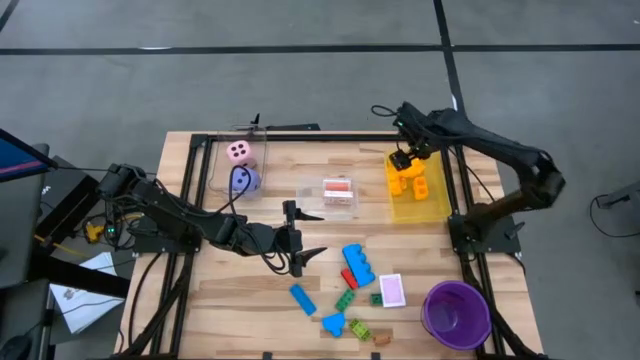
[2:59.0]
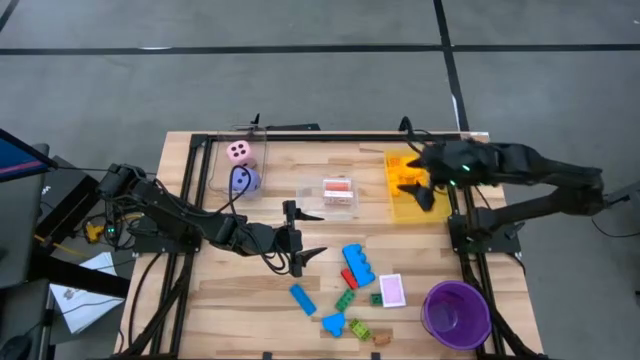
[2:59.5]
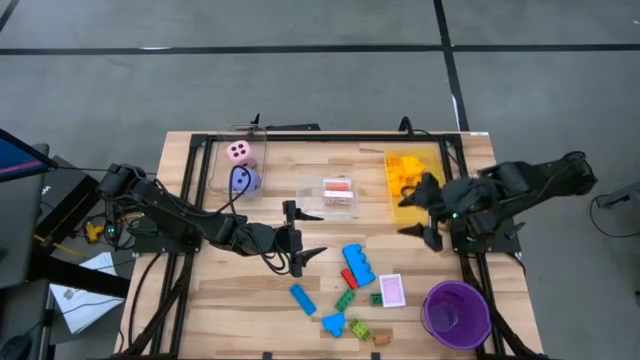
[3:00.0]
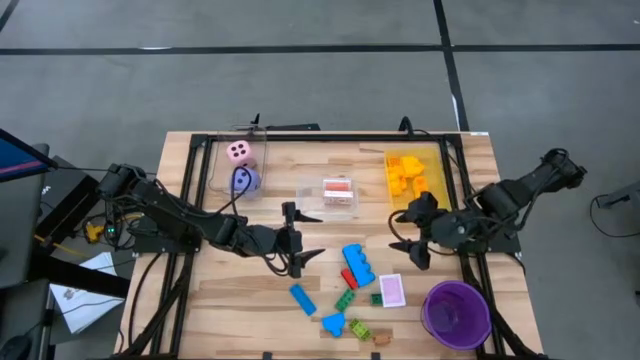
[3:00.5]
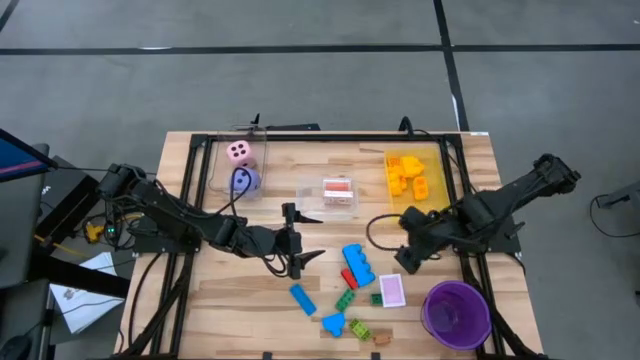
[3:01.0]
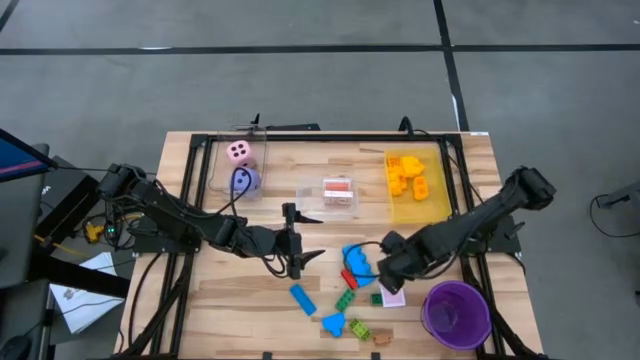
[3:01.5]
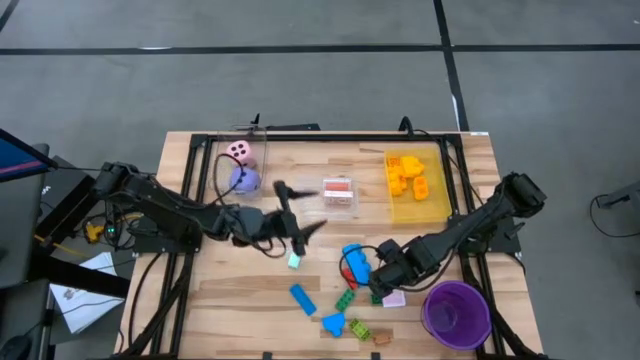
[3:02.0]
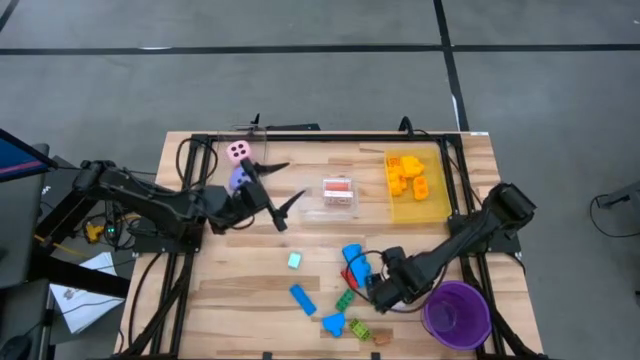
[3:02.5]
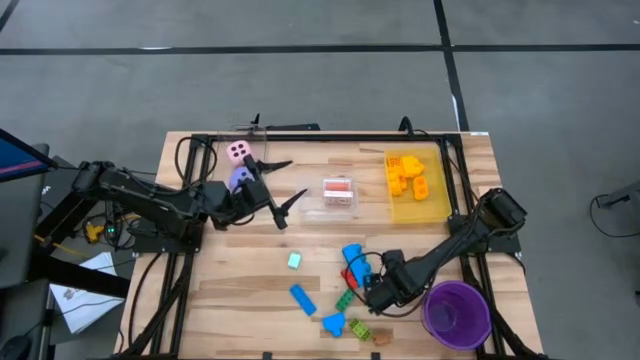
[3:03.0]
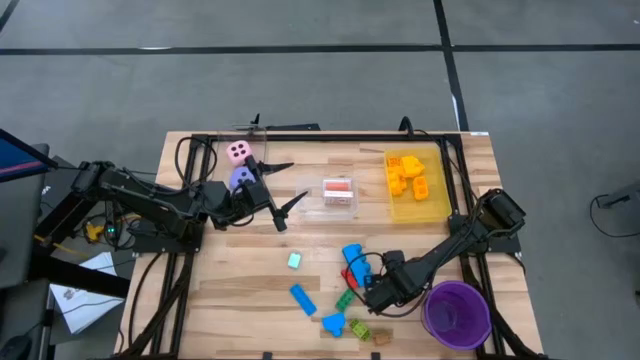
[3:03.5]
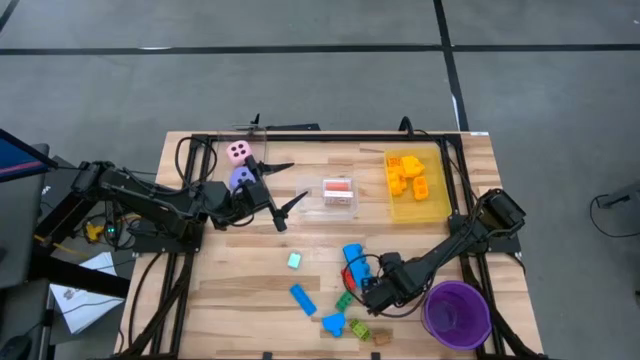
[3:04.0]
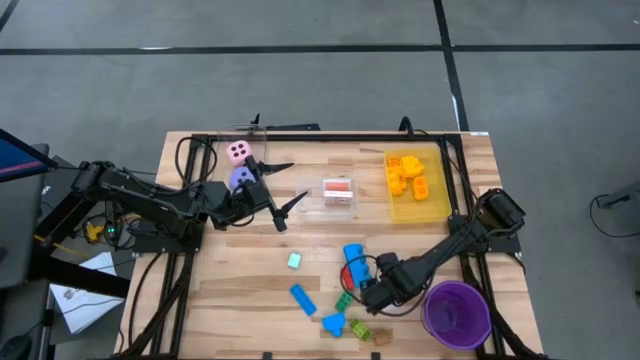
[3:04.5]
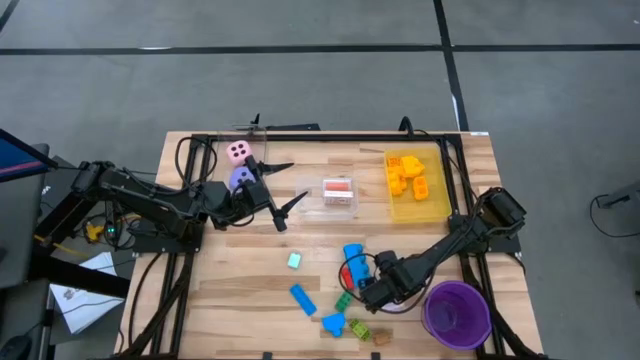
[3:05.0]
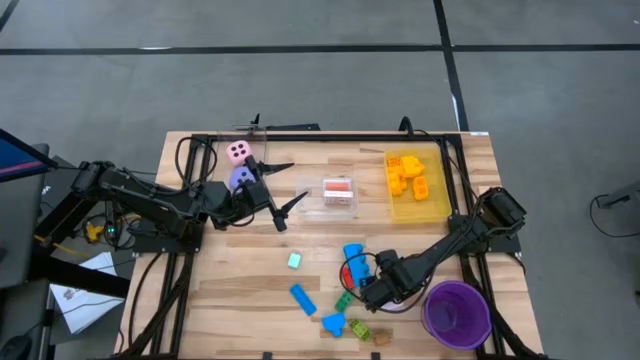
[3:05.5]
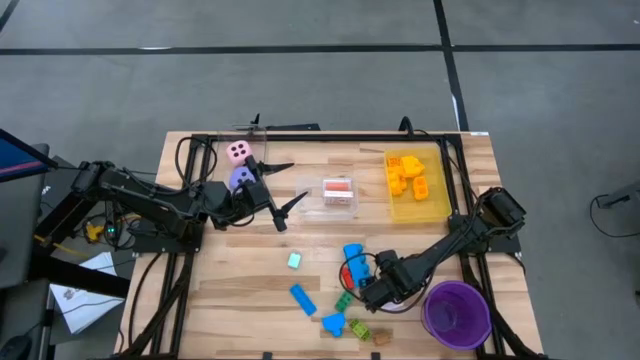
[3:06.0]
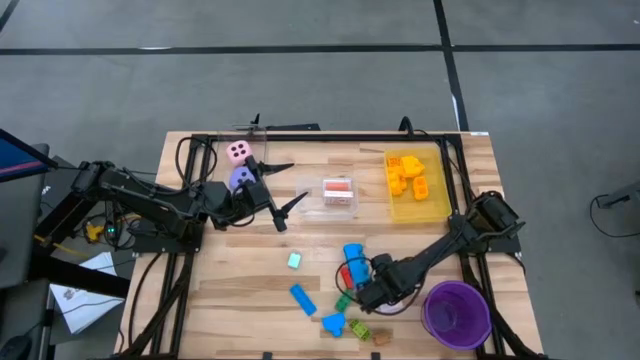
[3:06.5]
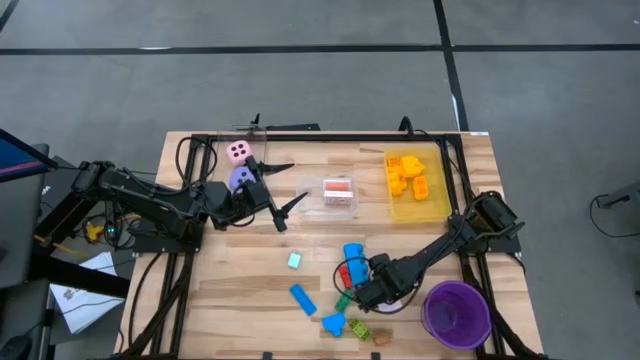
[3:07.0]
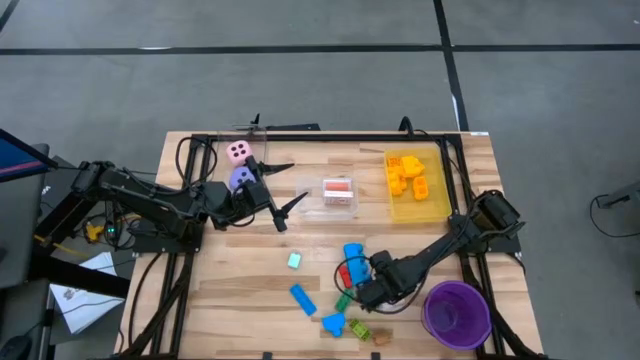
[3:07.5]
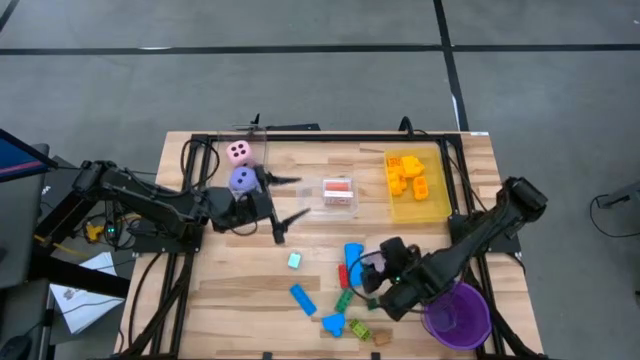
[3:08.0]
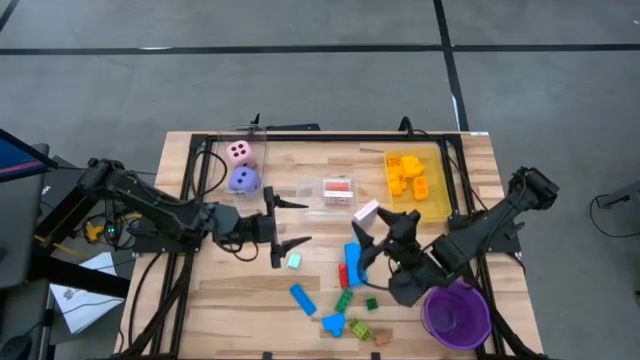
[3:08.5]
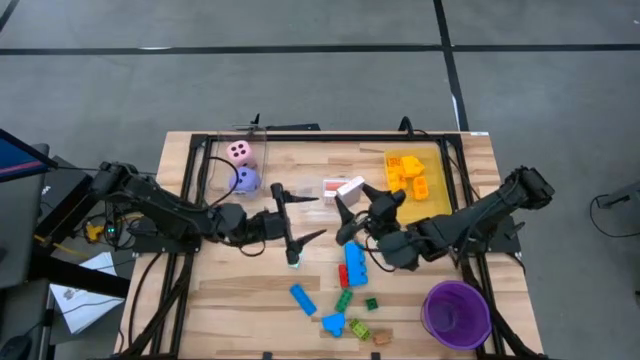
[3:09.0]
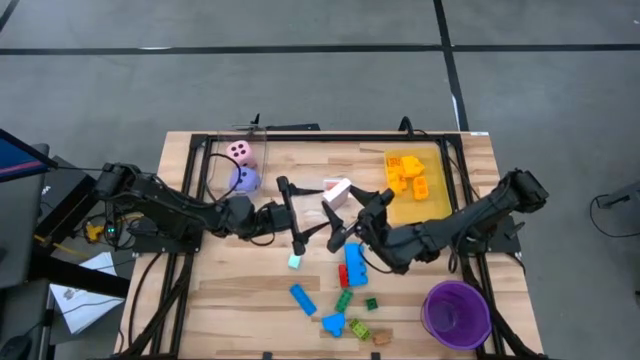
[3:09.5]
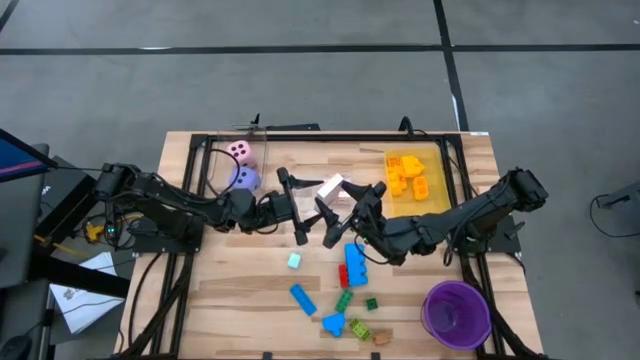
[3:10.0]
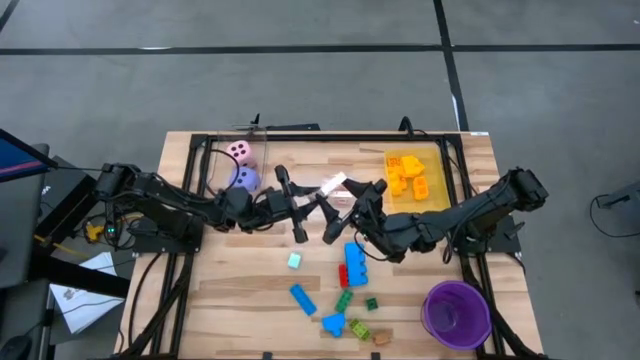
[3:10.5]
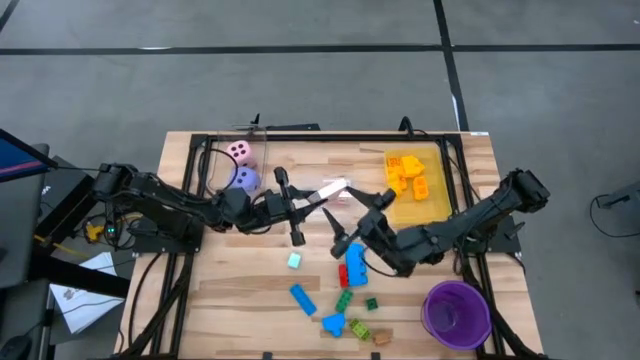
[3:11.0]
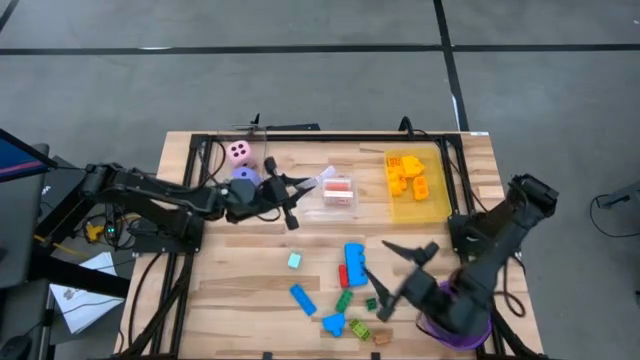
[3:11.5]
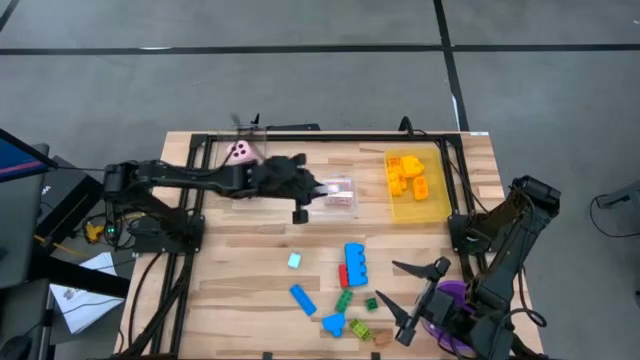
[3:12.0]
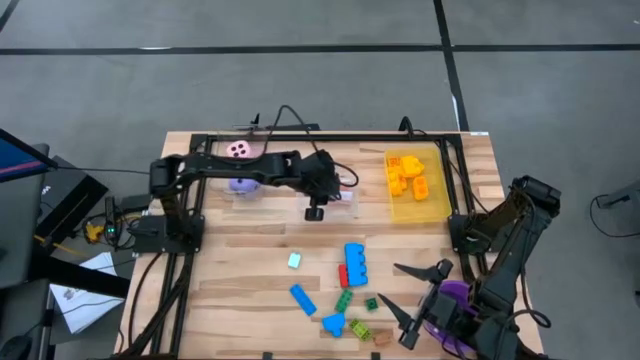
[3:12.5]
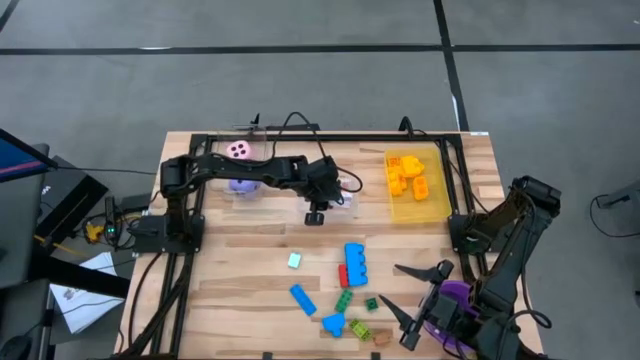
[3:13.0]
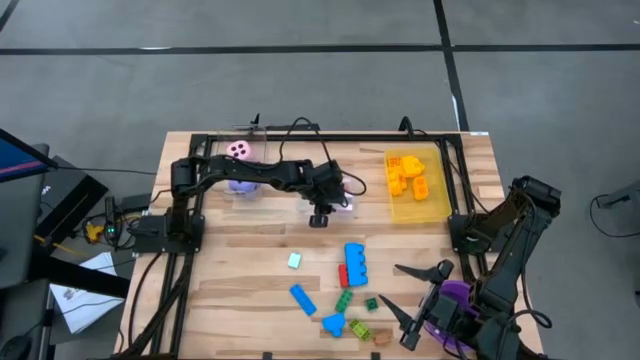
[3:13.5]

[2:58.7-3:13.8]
Task: Pick & Place Toys
Put the pink deck of cards into the bottom transparent bin

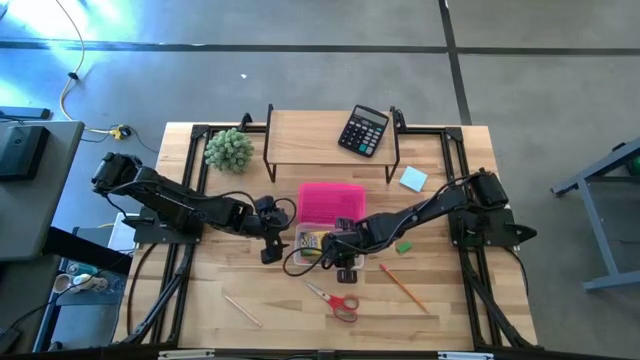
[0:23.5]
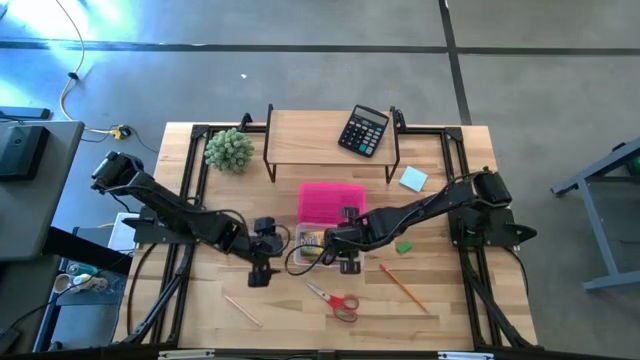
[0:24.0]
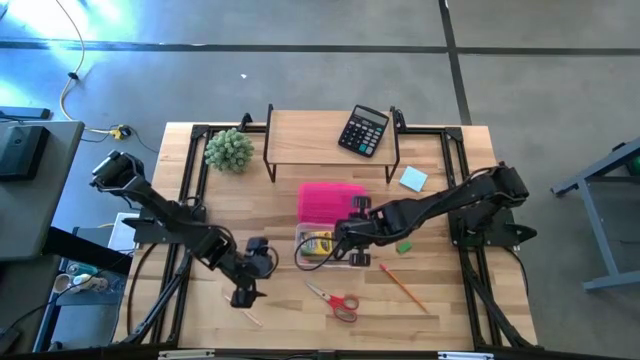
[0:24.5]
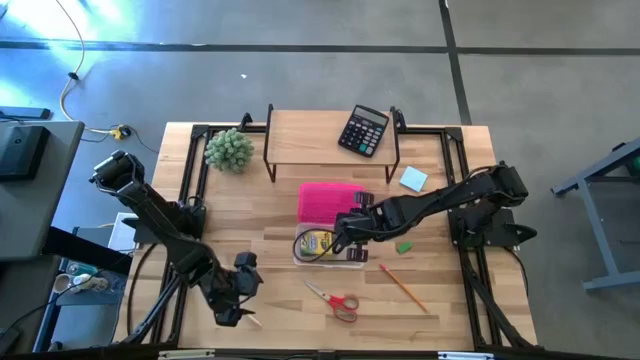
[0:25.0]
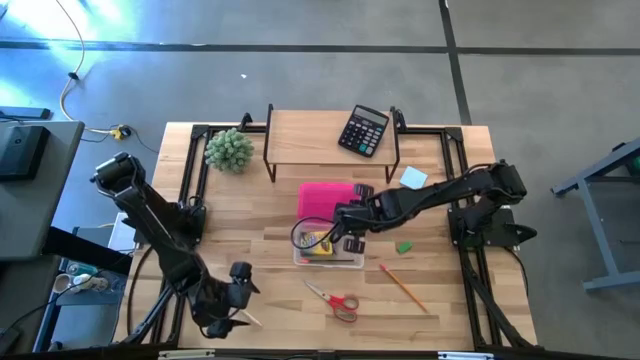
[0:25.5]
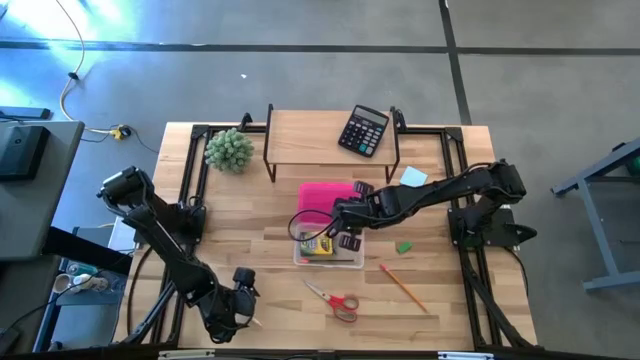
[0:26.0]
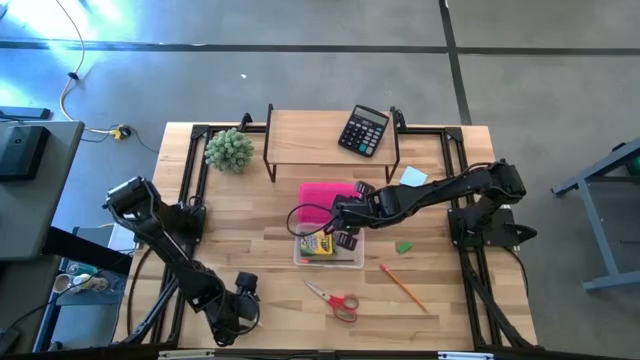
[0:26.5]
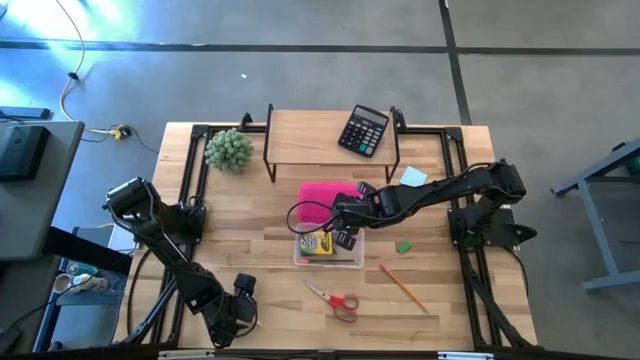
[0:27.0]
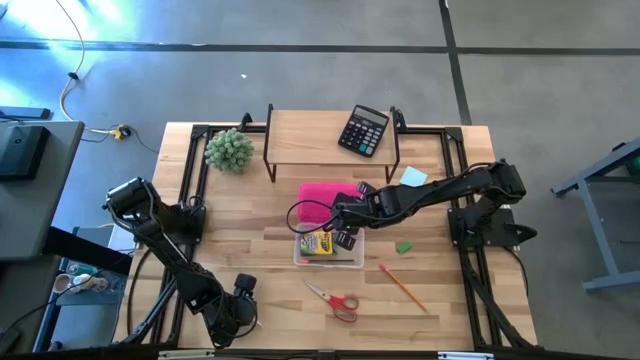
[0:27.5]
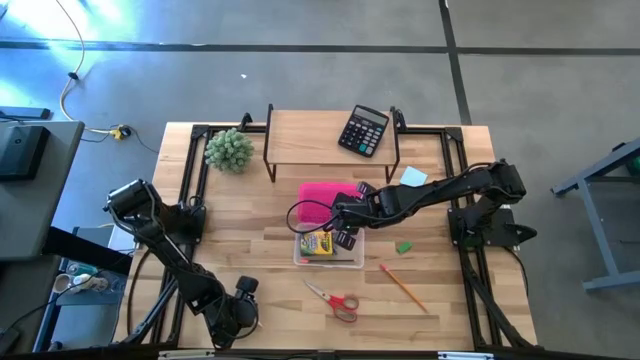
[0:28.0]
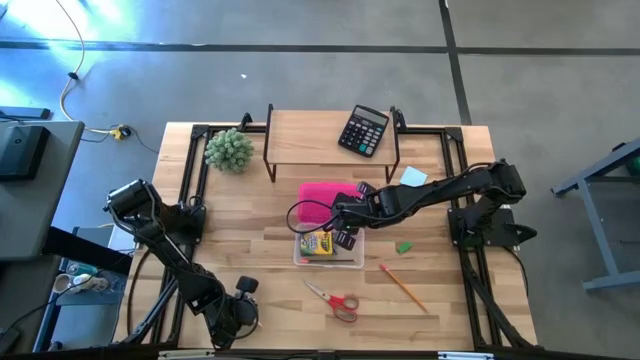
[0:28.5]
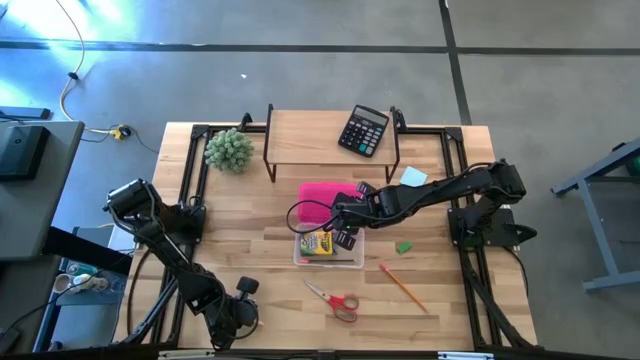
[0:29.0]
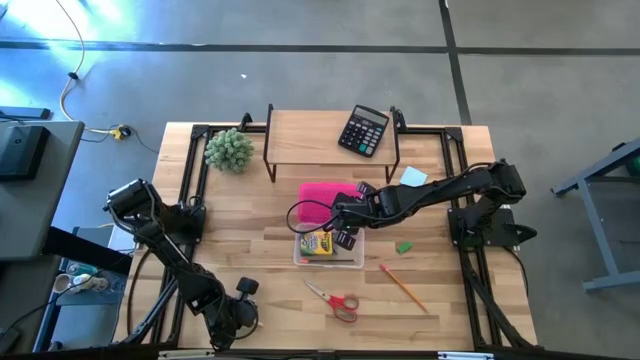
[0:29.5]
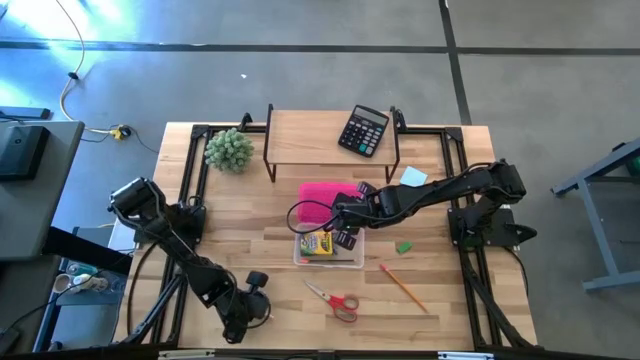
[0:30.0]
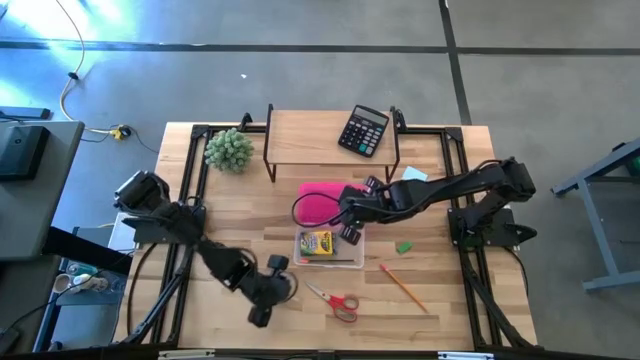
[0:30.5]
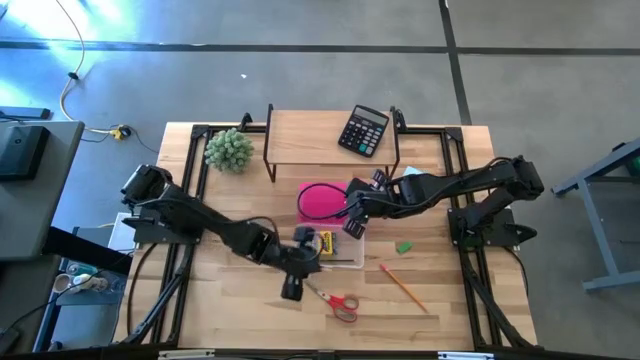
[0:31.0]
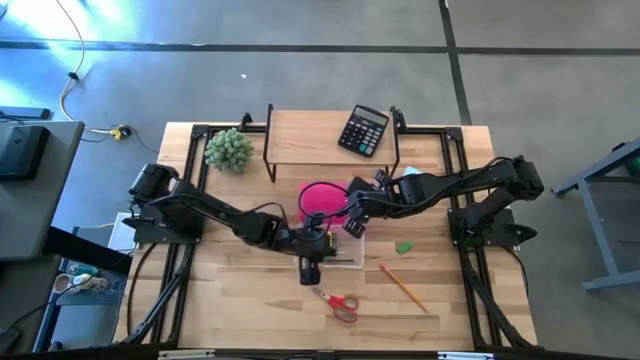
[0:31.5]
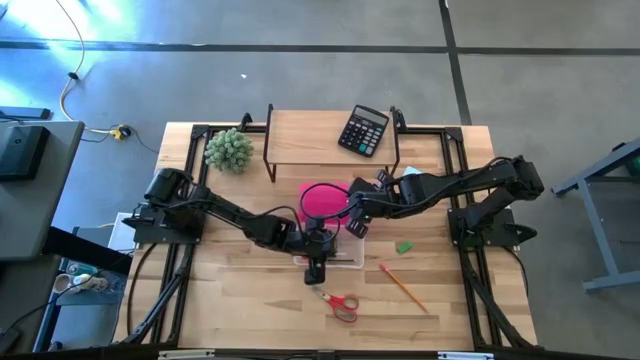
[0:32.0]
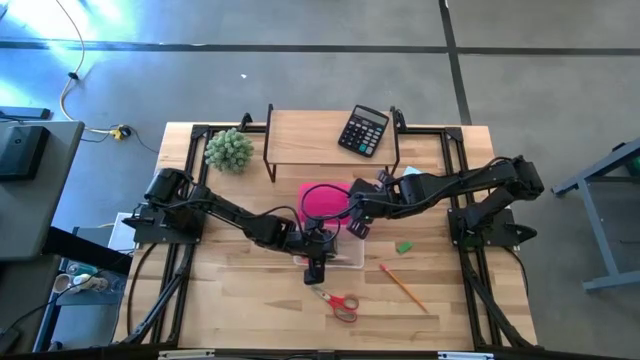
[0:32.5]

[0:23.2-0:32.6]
Task: Pack school essentials
Put the white pen into the pink supply box
